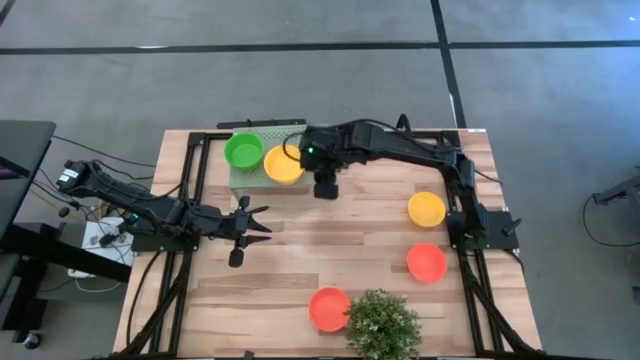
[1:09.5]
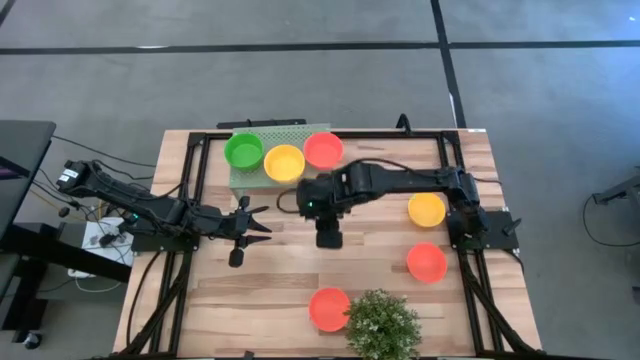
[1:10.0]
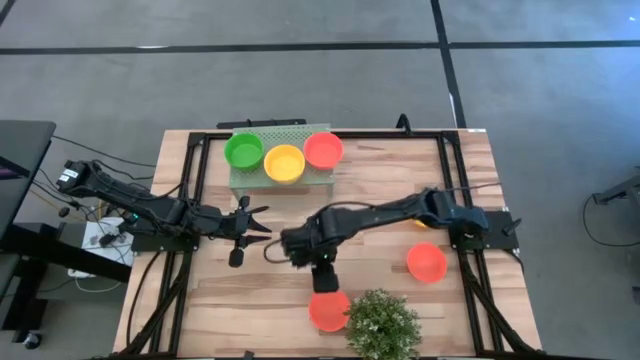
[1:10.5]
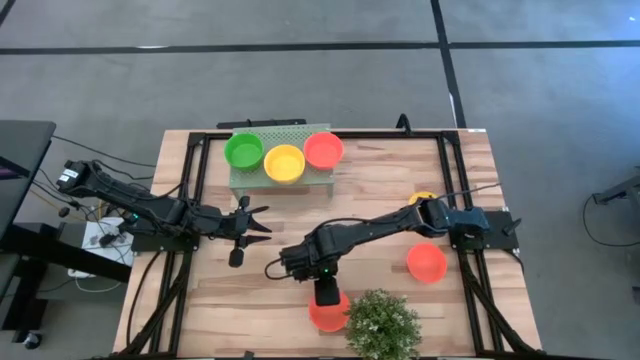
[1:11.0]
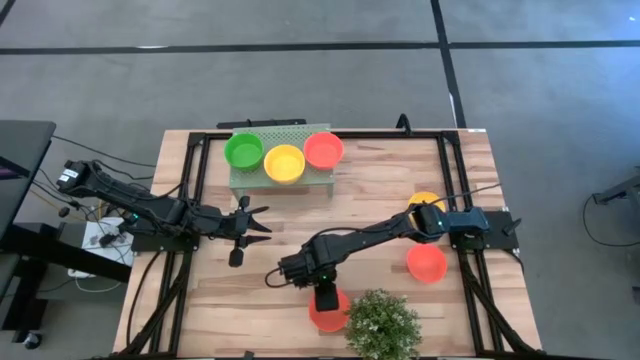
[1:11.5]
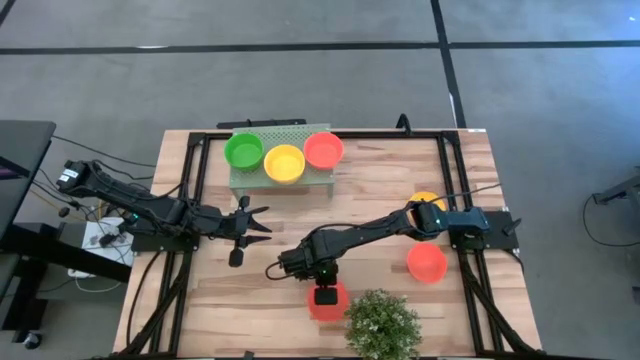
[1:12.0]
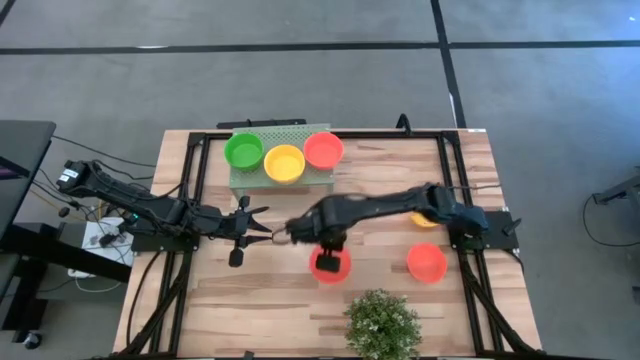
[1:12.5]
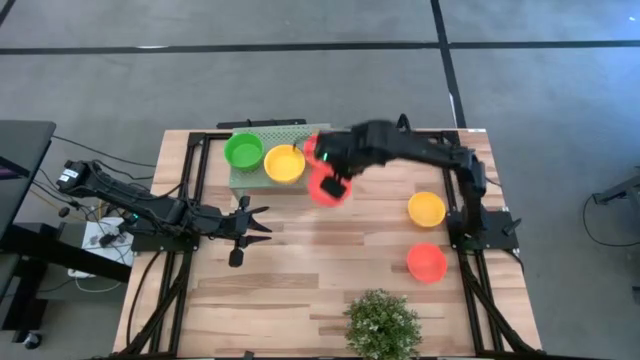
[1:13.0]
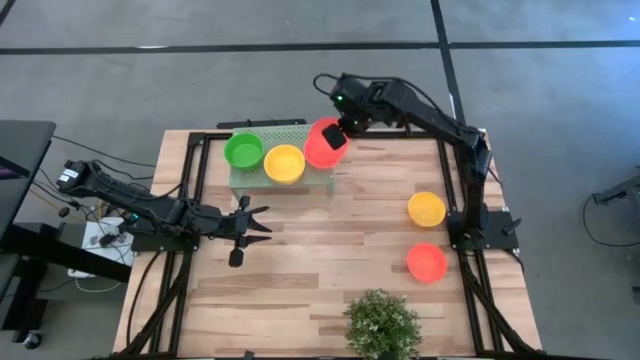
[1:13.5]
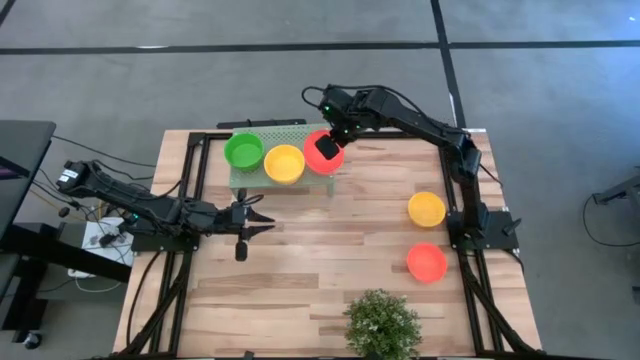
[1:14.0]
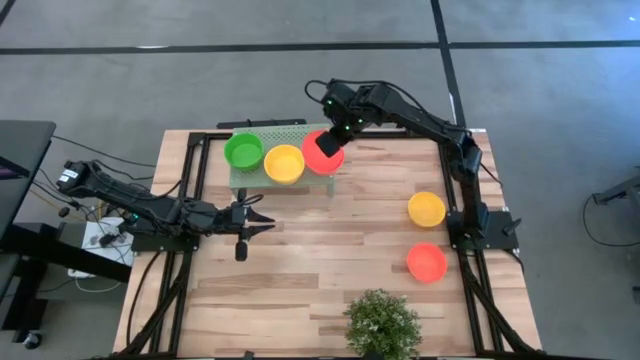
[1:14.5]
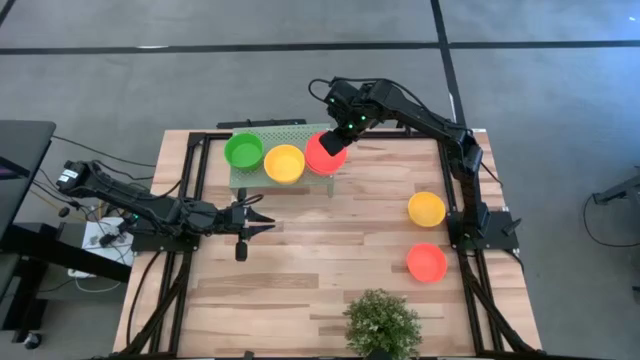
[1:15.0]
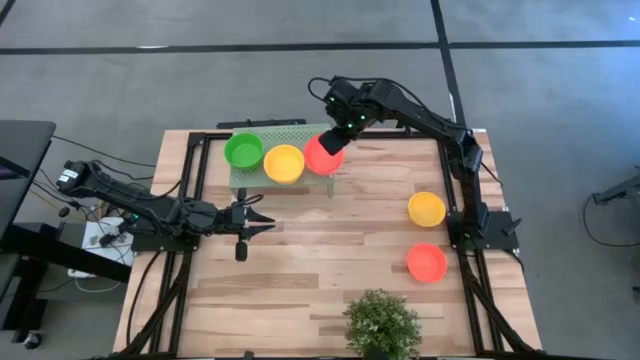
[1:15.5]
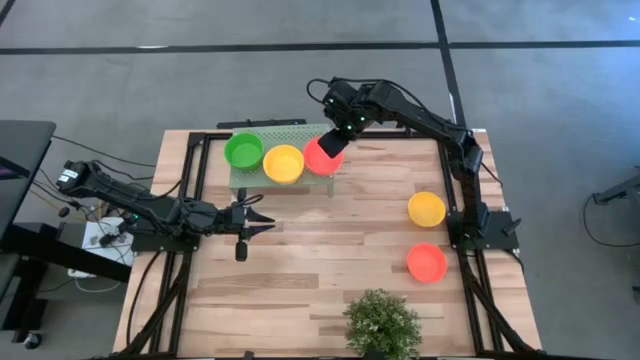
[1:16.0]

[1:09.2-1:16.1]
Task: Pick & Place Mini bowls
Stack the orange bowl on top of the orange bowls on the shelf

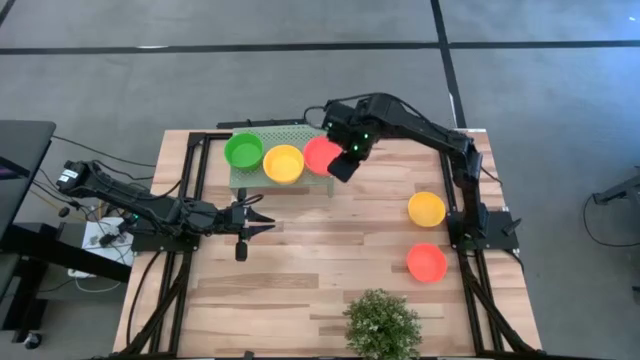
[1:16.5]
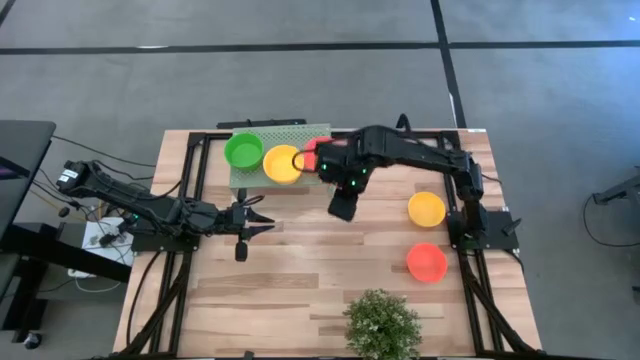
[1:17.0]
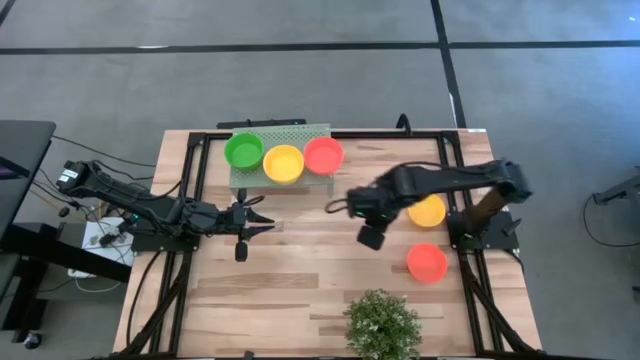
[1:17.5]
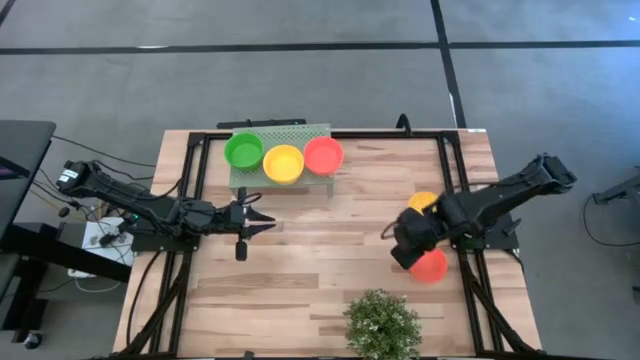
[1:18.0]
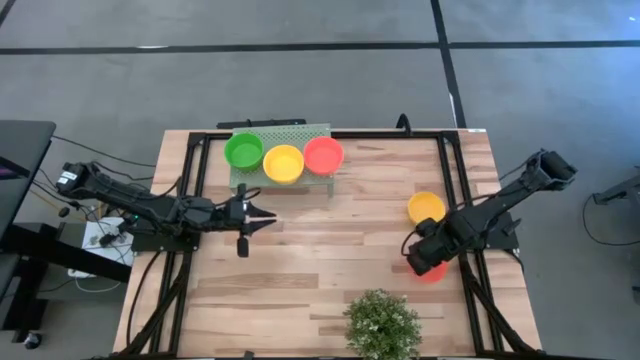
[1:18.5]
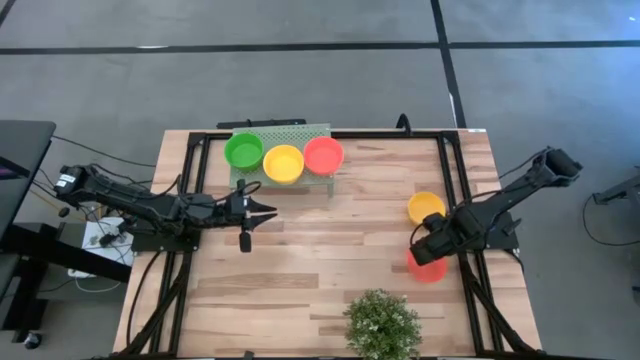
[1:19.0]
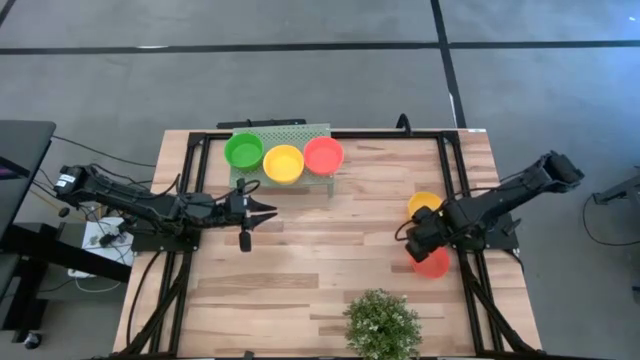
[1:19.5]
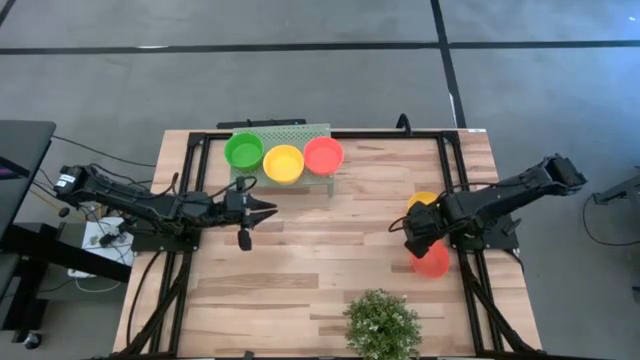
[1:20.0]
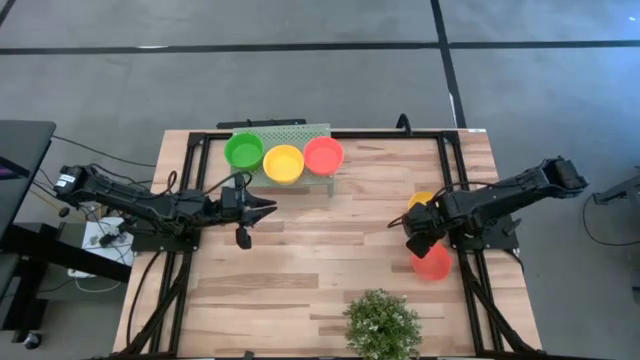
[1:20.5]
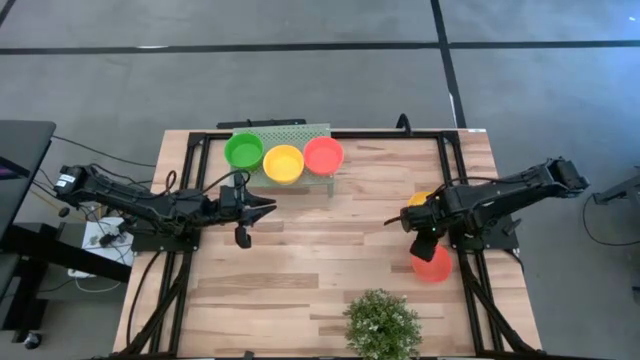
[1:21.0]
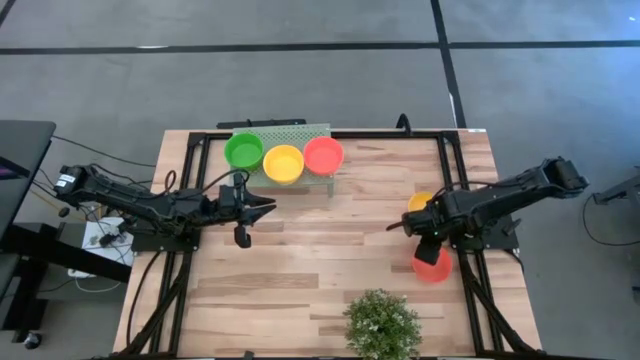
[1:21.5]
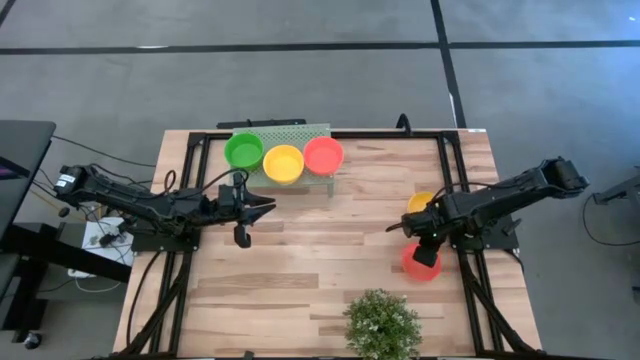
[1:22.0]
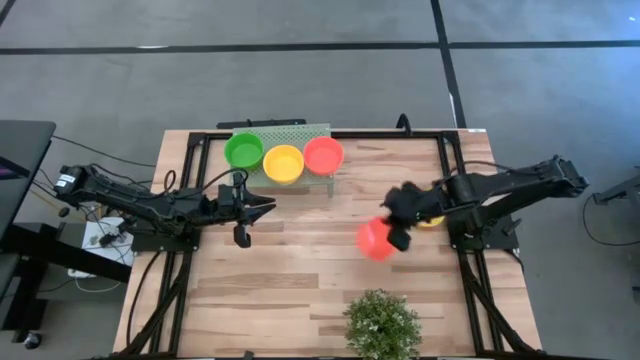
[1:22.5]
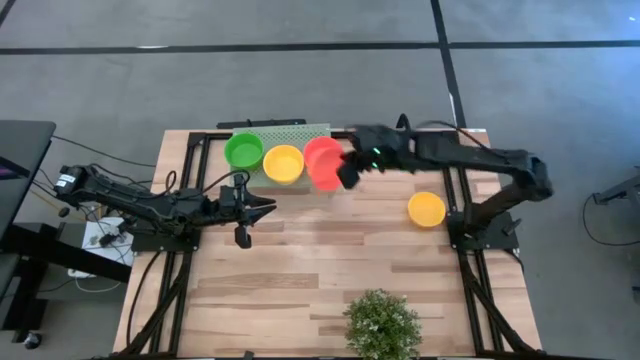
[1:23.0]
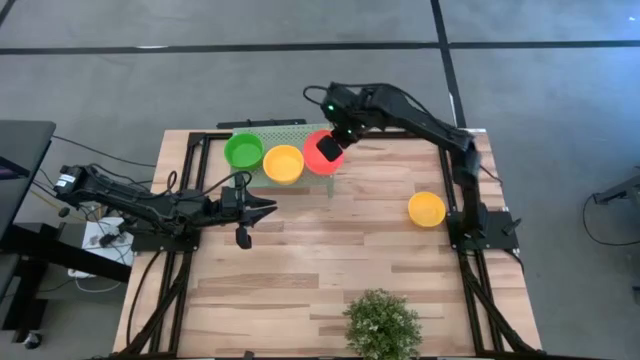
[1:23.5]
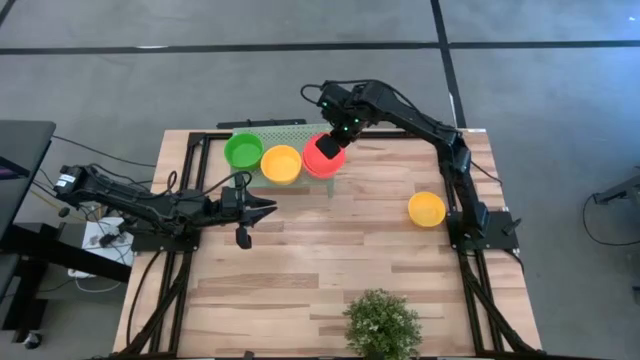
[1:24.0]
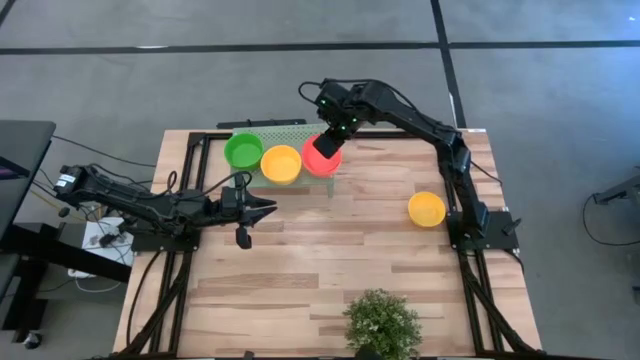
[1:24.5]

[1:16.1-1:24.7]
Stack the orange bowl on top of the orange bowls on the shelf

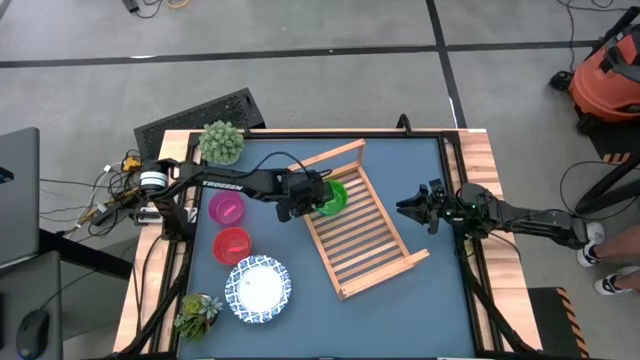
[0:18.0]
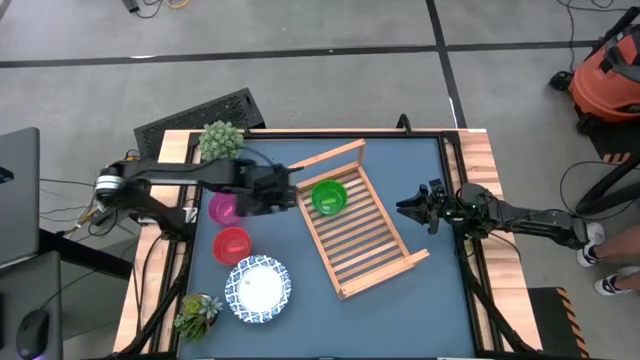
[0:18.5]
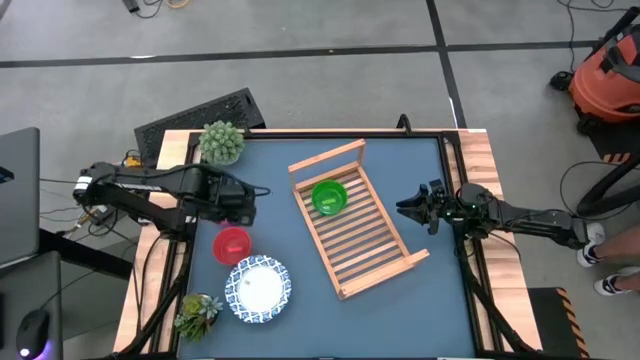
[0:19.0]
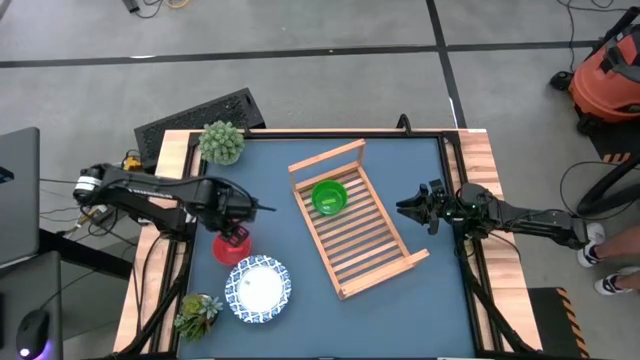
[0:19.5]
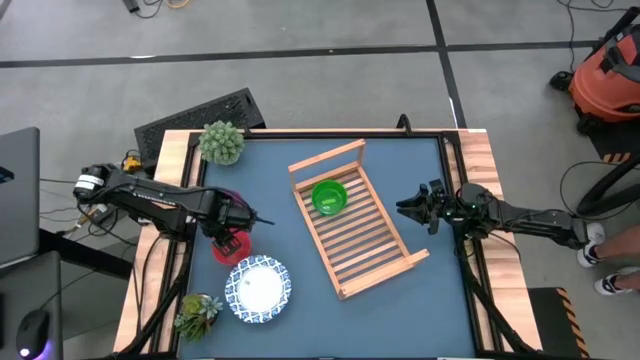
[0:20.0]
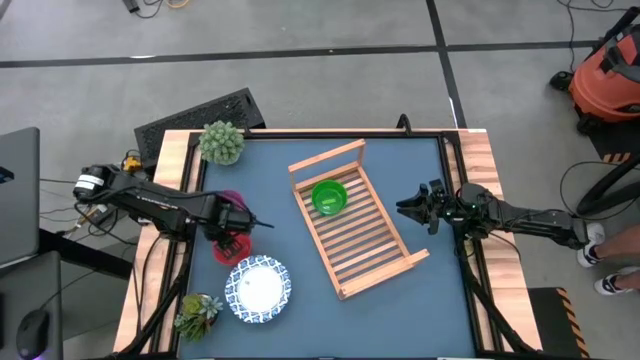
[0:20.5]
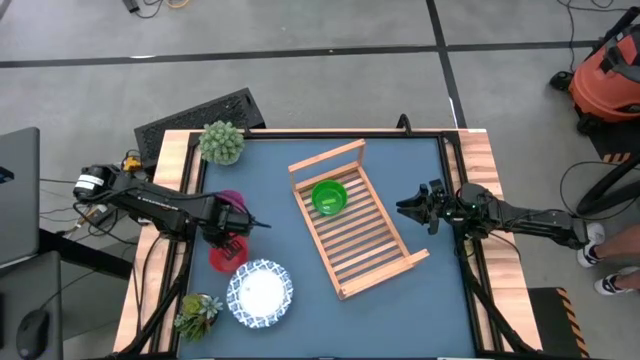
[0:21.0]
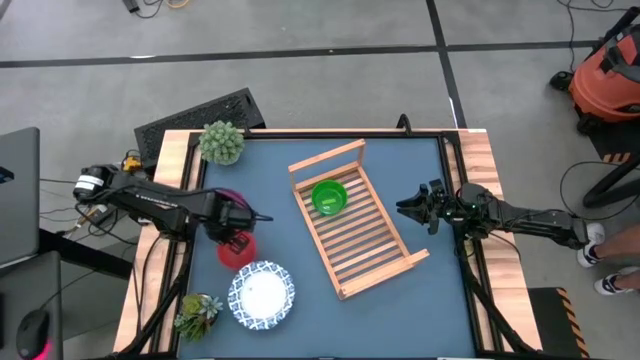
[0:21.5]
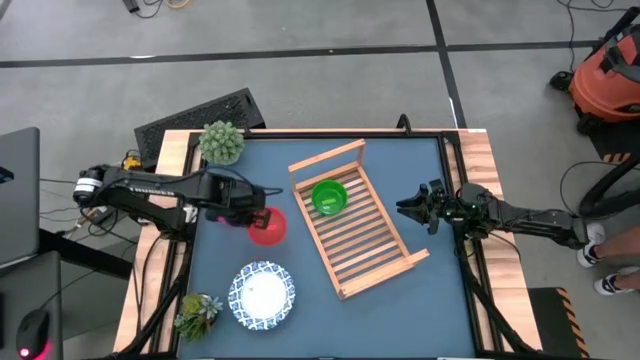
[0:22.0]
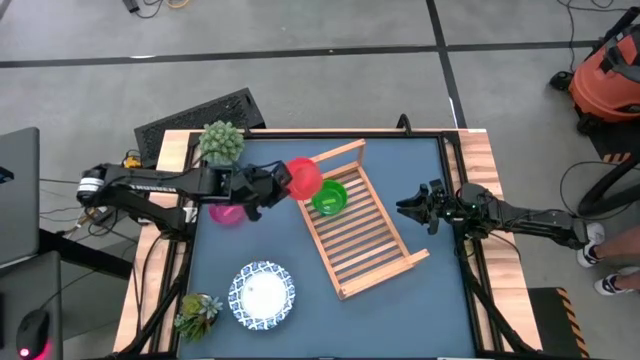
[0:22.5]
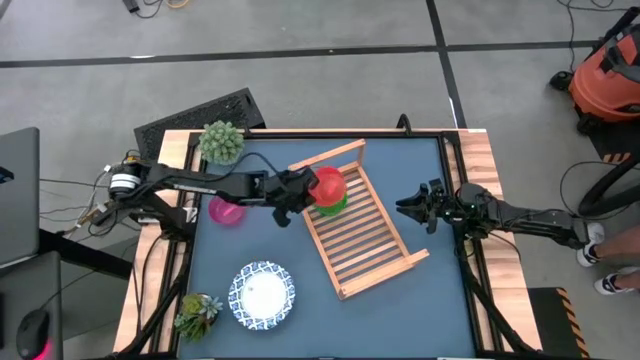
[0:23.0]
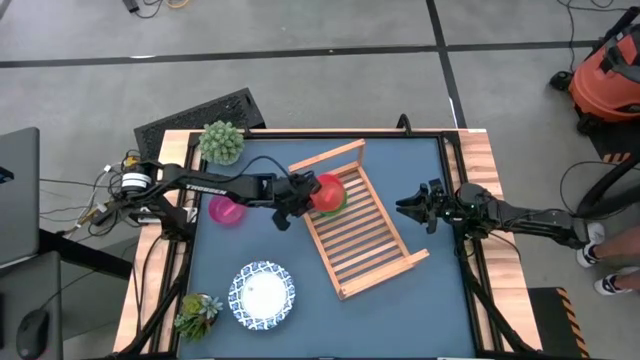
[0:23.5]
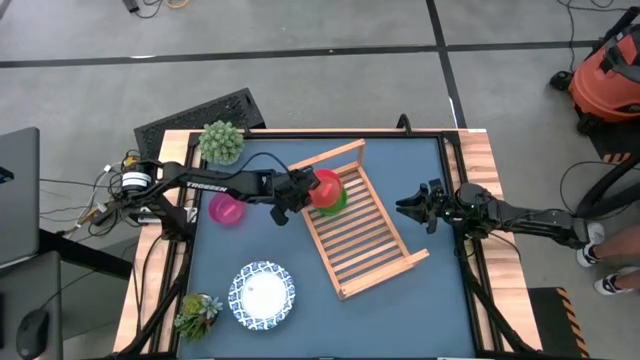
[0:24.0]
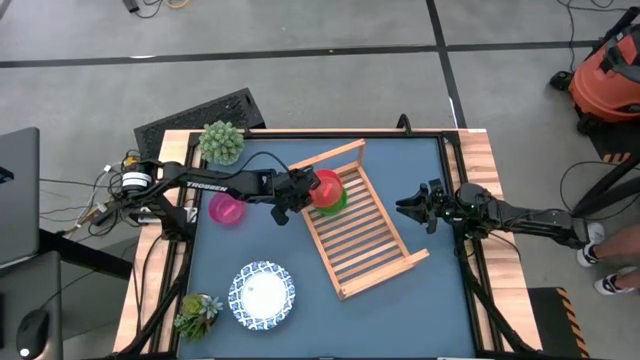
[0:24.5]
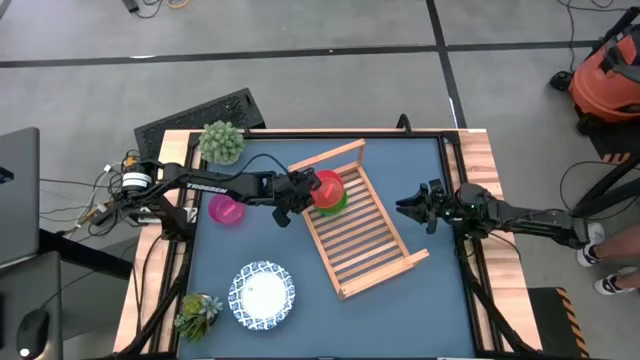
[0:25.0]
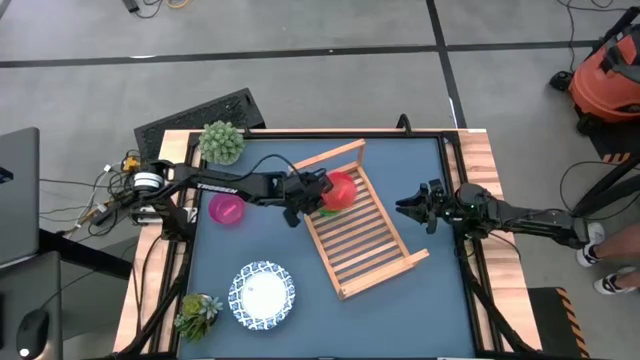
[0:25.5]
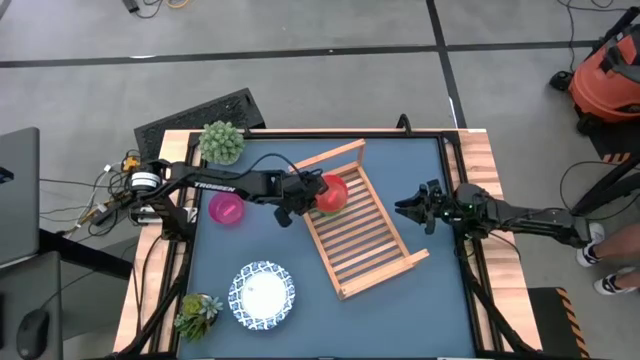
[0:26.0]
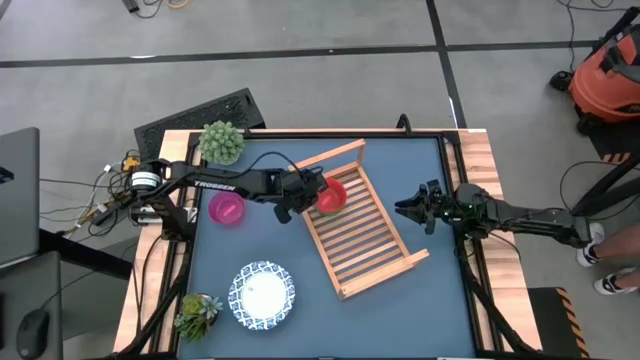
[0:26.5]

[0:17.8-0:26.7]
Task: Place and stack bowls onto a shelf
Stack the orange bowl on top of the green bowl
